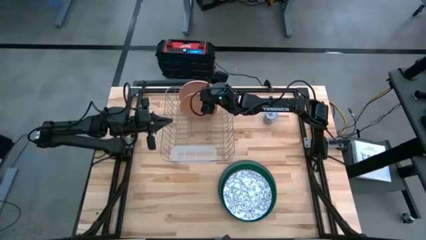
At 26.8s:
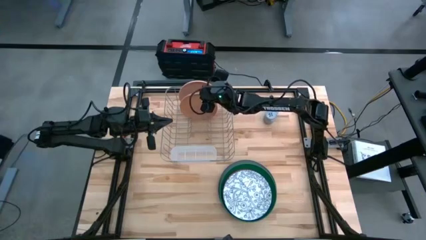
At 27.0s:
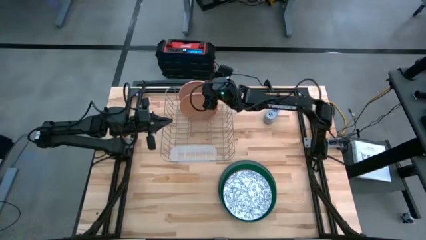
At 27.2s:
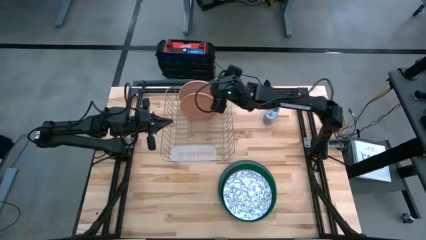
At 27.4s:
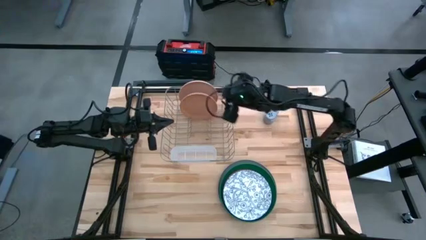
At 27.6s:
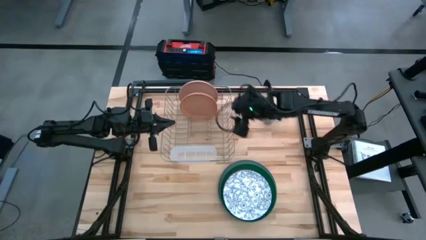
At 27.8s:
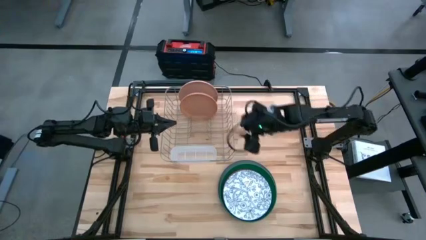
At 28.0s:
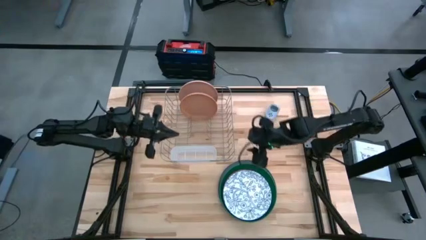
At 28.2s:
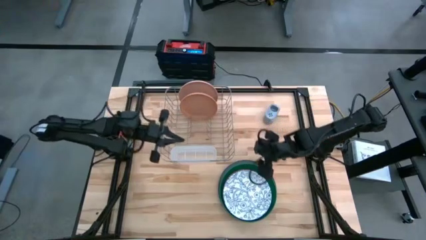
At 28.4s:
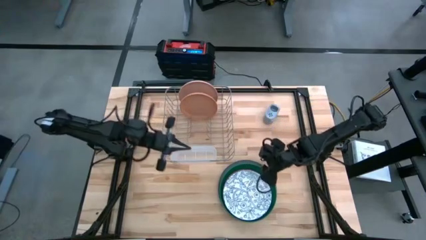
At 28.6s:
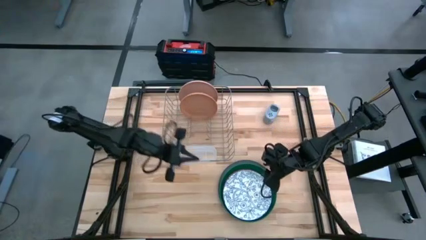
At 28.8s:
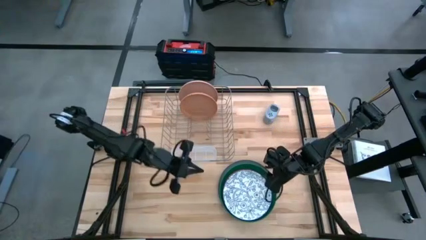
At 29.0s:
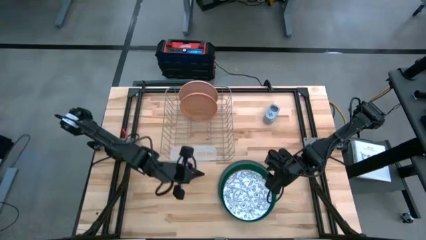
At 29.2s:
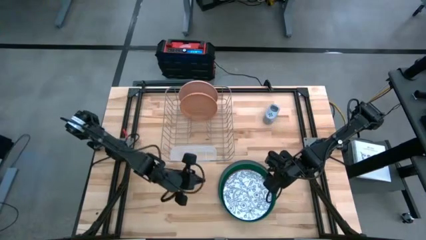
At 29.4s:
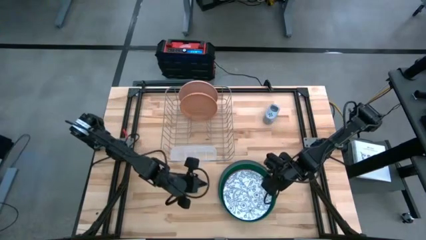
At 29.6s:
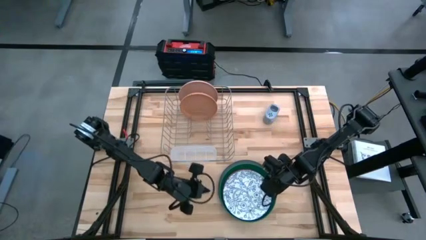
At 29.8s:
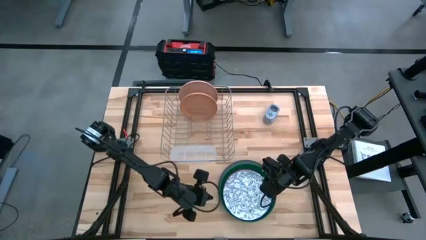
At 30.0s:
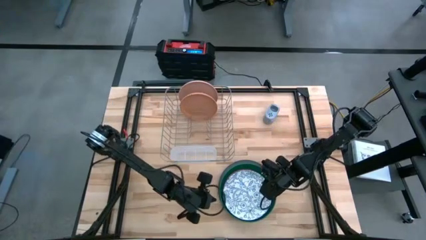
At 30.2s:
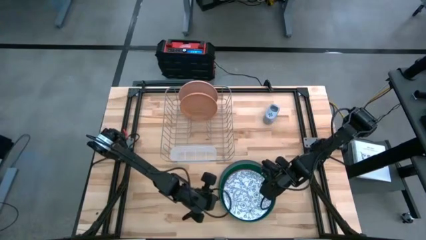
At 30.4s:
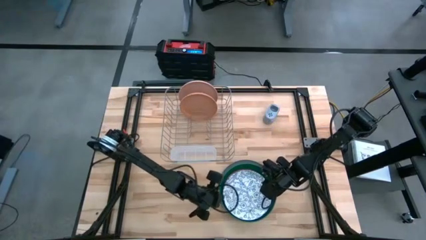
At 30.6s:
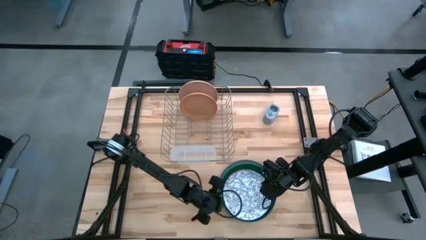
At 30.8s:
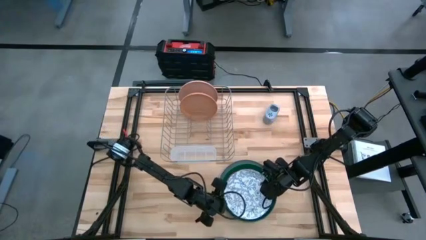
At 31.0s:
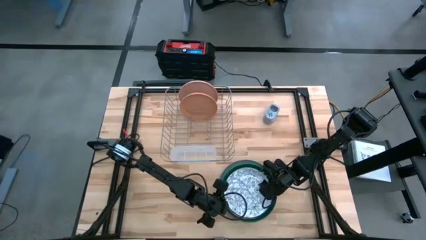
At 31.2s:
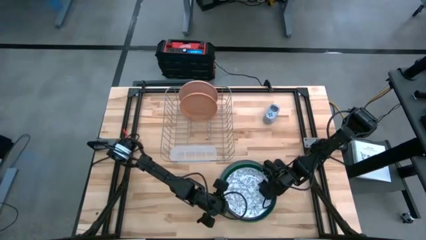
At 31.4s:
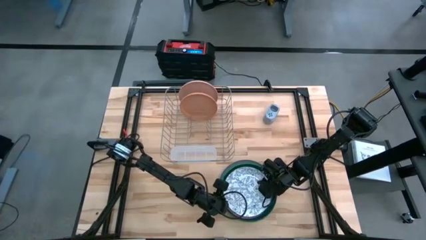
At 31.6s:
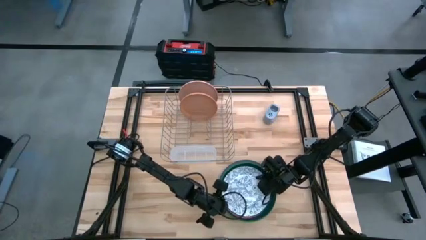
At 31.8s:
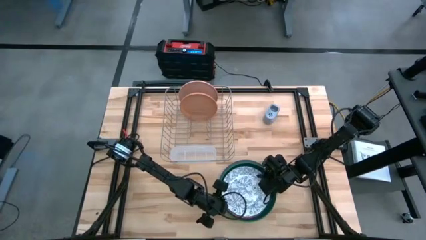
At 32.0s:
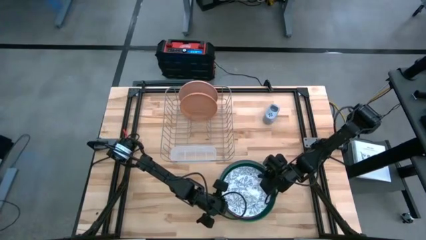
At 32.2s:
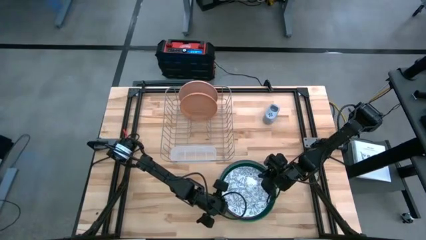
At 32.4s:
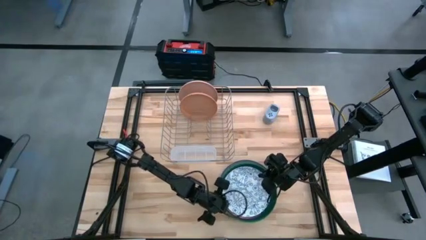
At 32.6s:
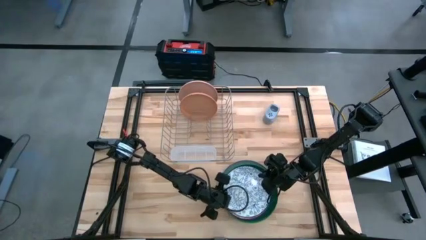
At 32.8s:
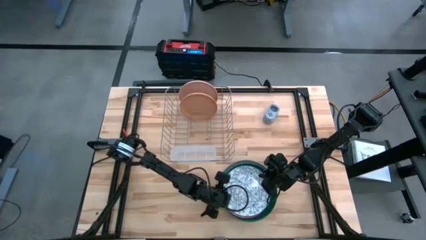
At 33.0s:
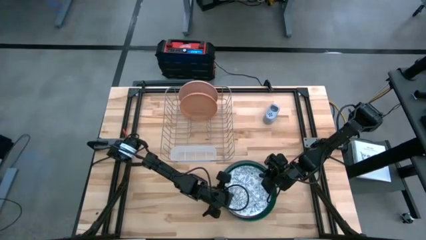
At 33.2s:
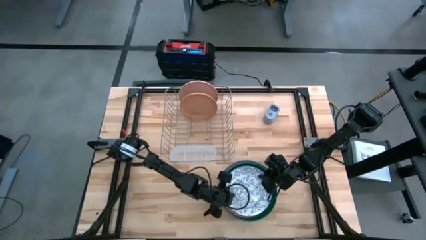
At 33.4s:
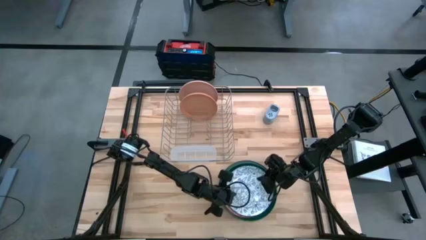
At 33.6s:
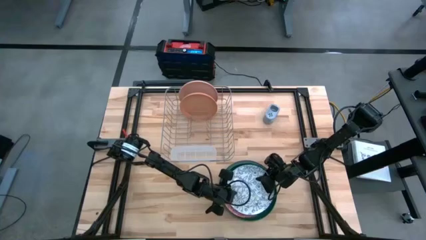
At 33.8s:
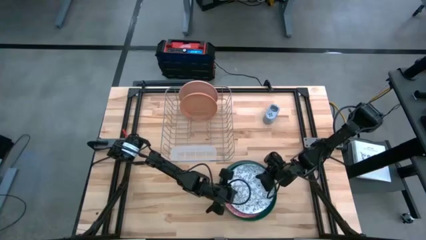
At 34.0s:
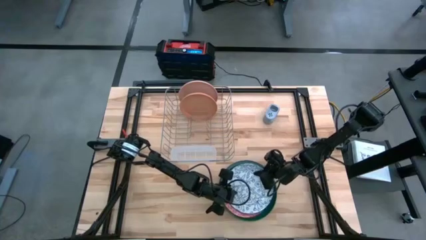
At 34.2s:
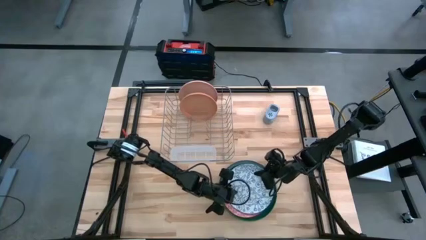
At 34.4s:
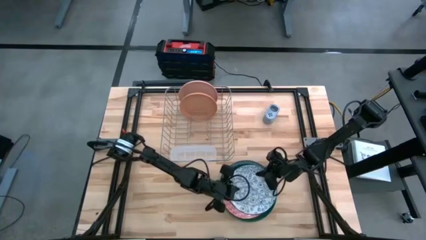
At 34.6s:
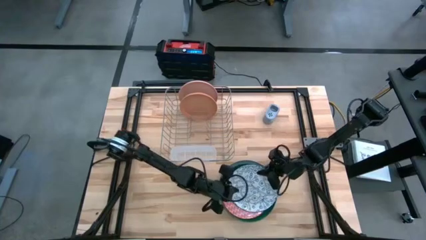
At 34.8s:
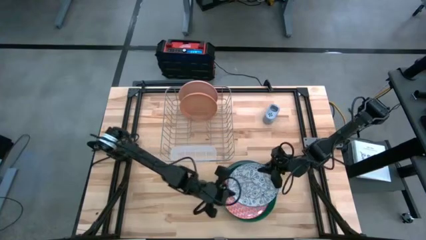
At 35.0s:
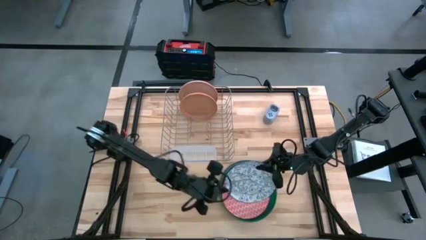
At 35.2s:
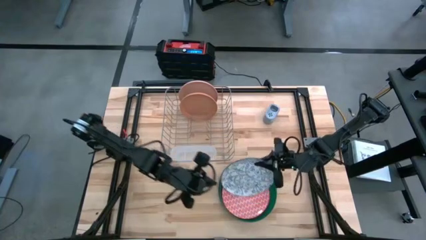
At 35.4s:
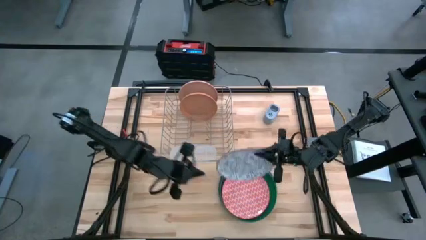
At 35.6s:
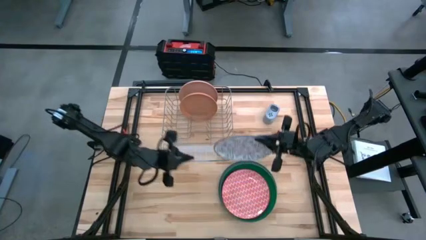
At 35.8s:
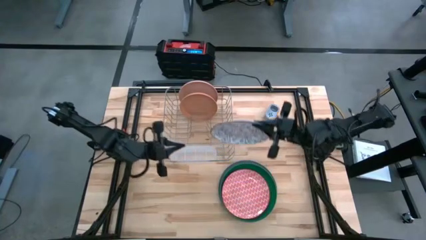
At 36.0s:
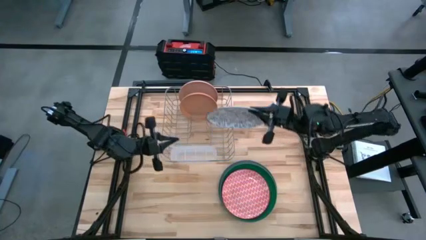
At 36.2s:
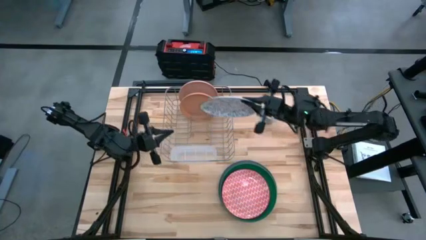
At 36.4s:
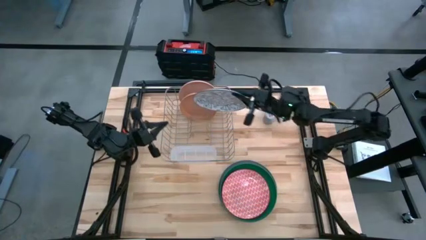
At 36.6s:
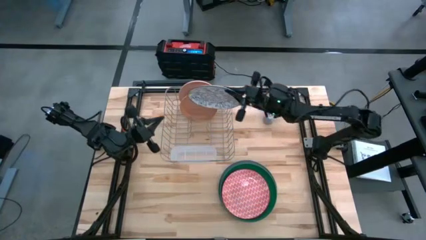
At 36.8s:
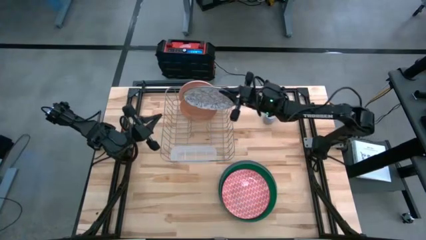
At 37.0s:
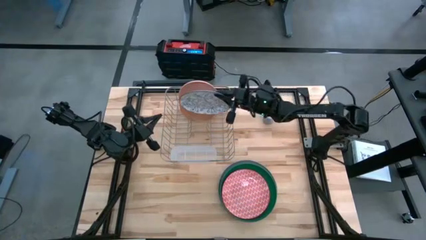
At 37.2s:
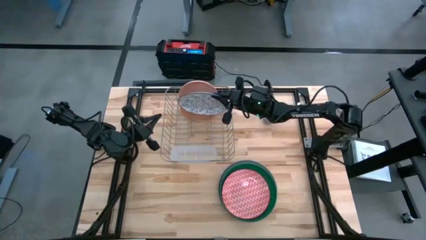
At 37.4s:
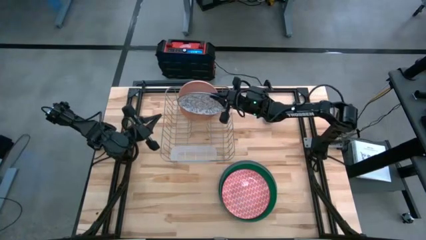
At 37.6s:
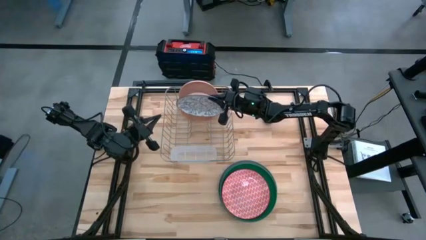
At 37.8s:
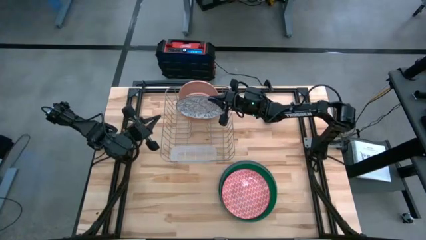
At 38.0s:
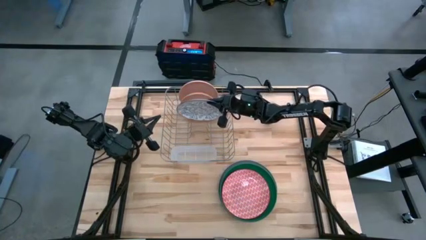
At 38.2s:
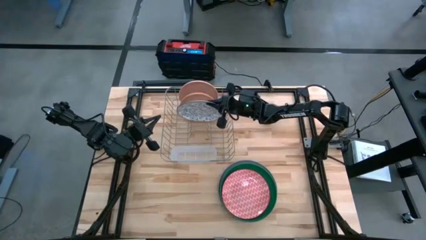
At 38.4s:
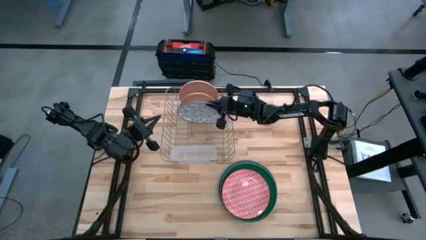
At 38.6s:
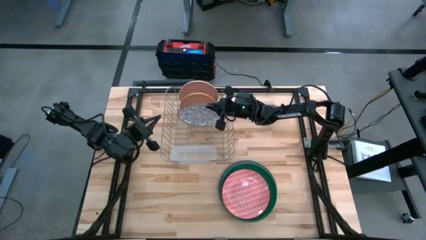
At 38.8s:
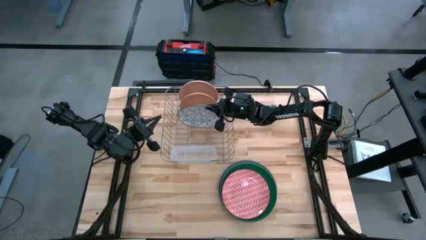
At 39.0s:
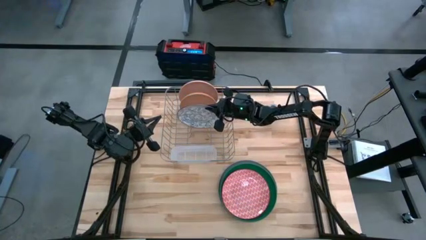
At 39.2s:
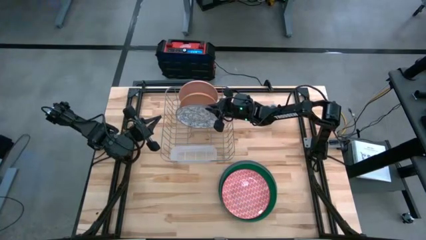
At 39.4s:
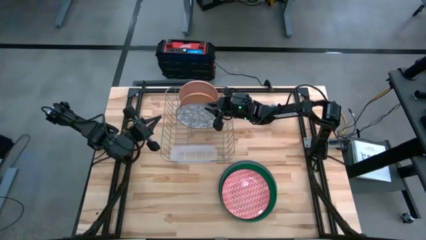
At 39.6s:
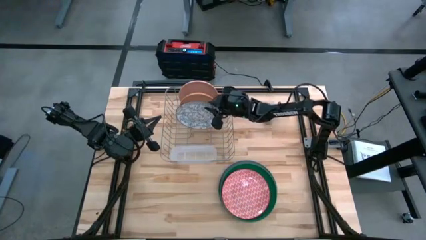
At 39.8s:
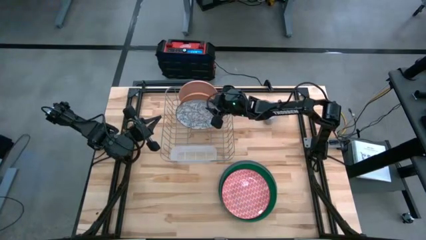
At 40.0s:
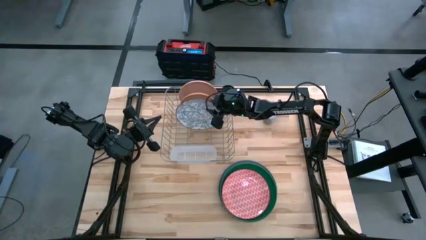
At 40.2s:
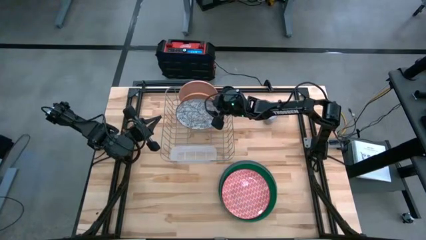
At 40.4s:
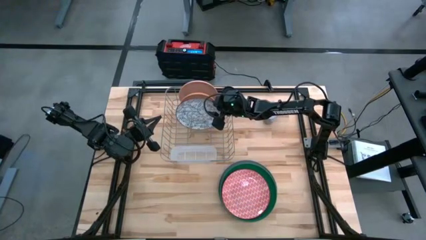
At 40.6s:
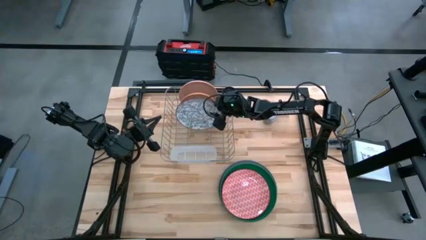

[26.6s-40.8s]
Task: Sort dishes
Put the white patterned plate in the dish rack
